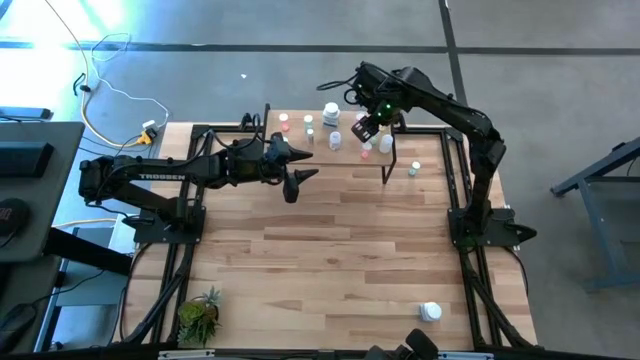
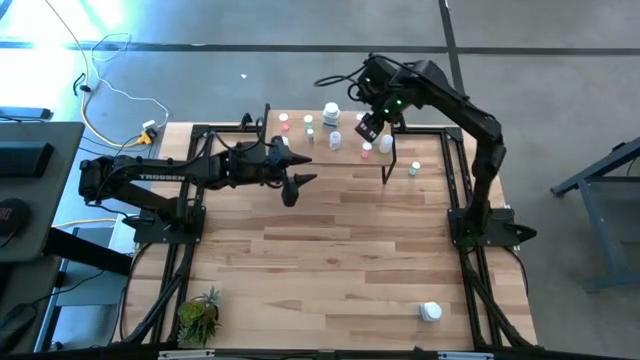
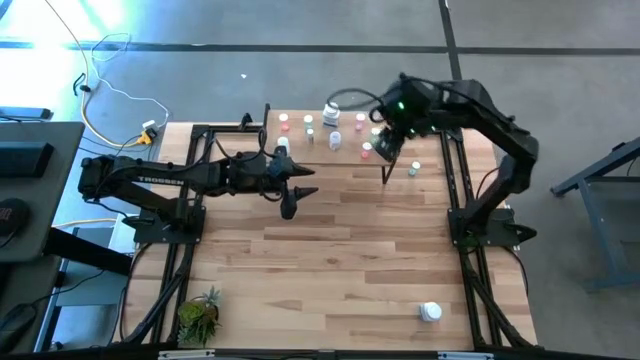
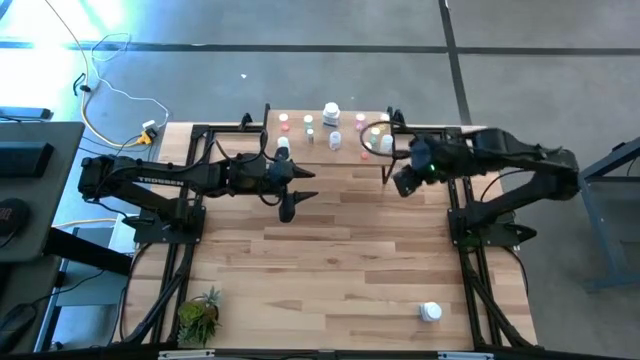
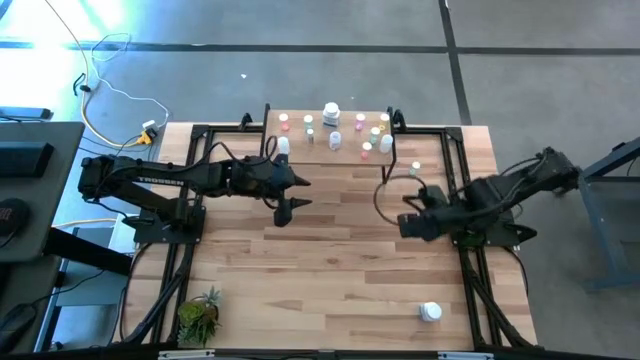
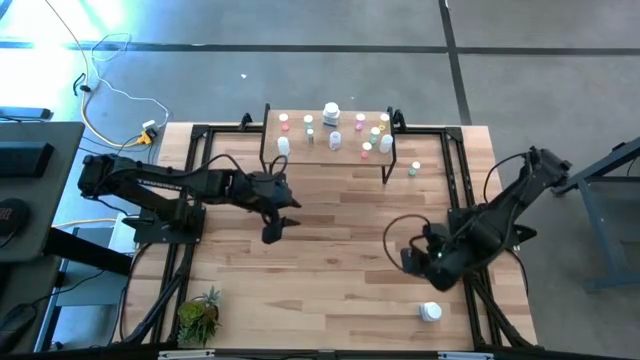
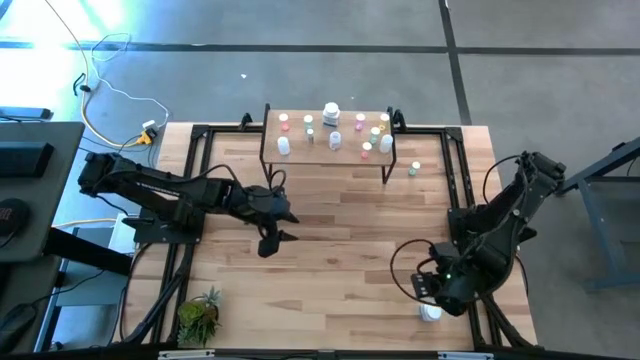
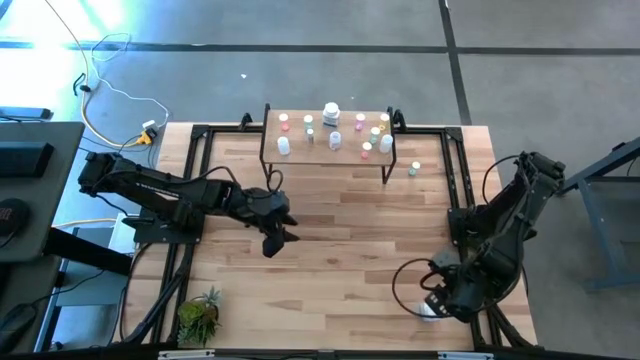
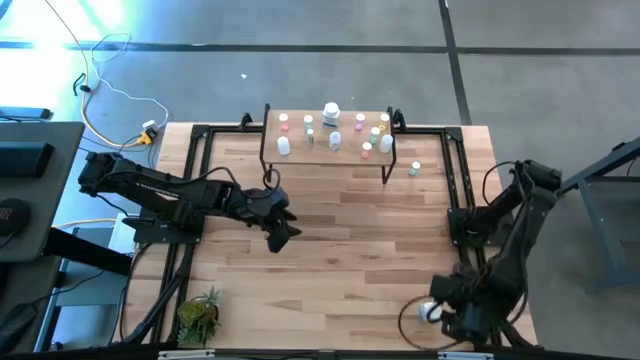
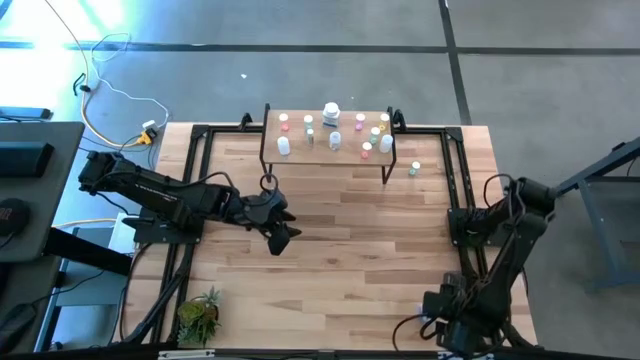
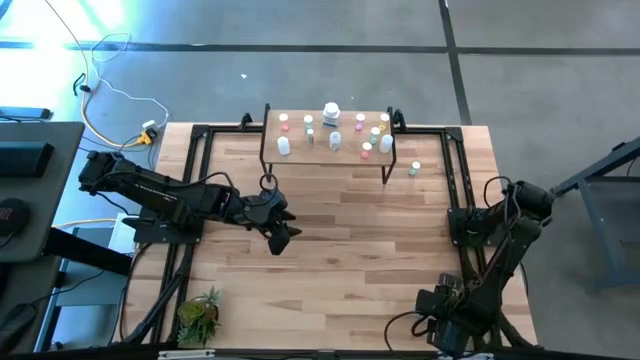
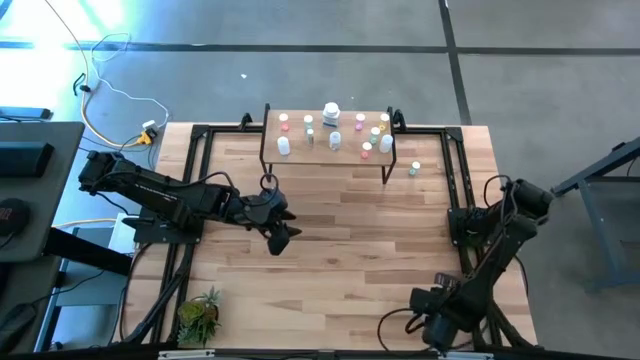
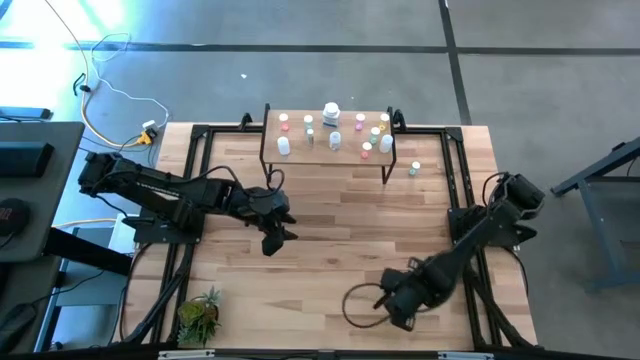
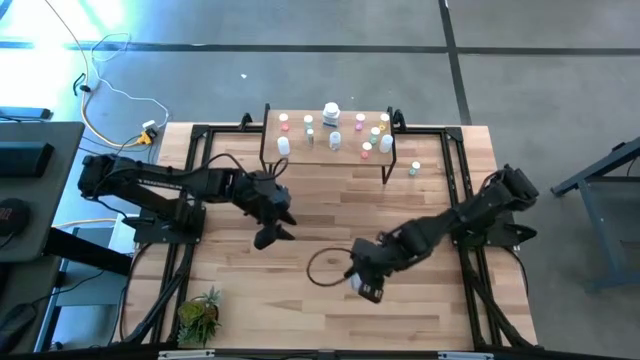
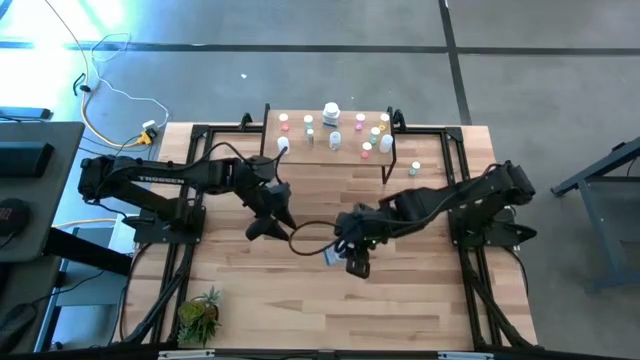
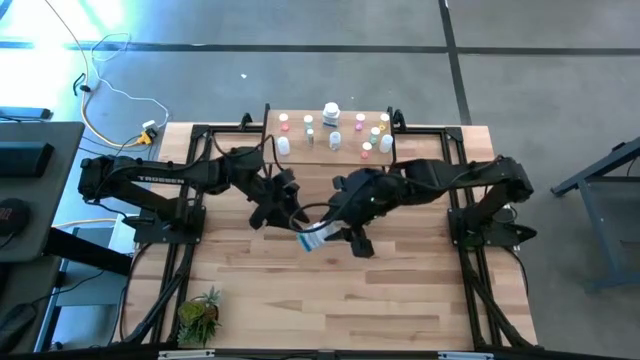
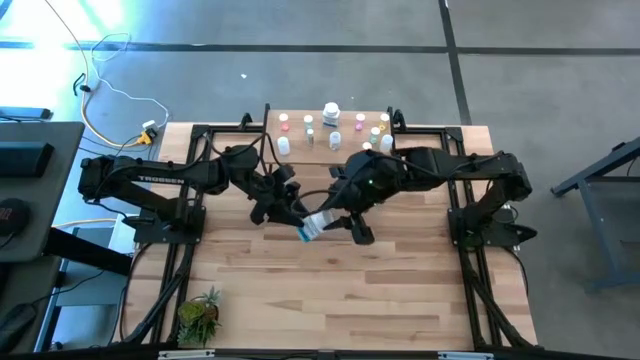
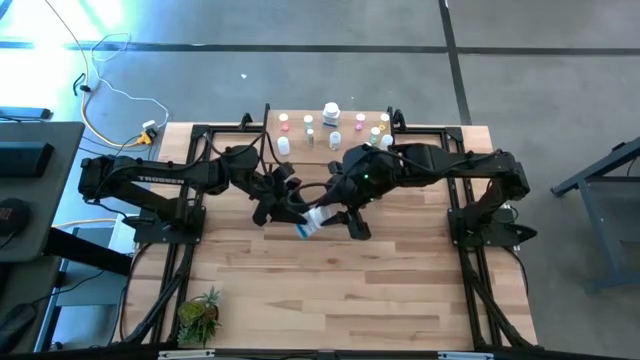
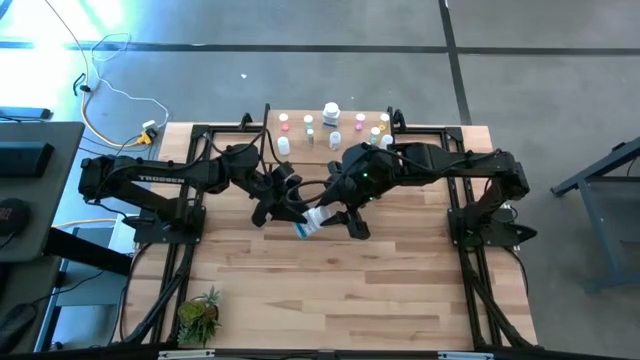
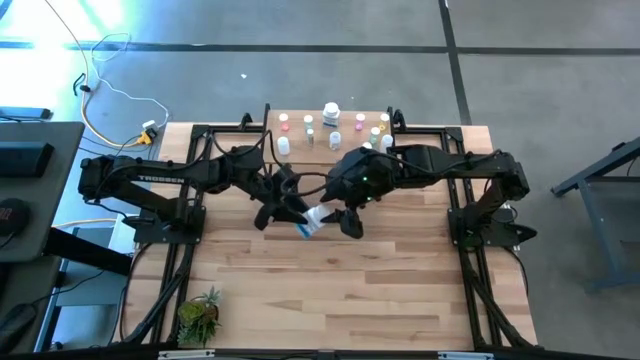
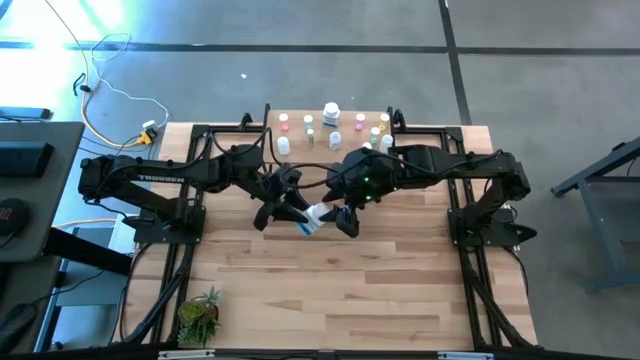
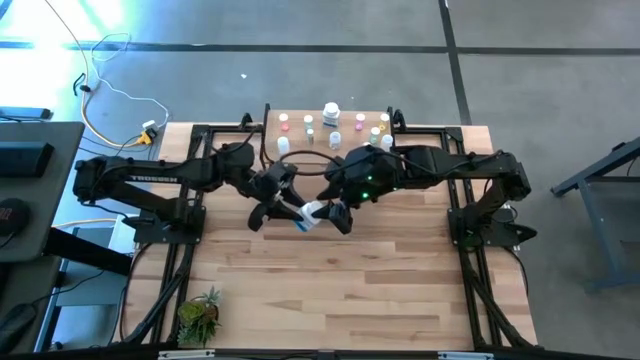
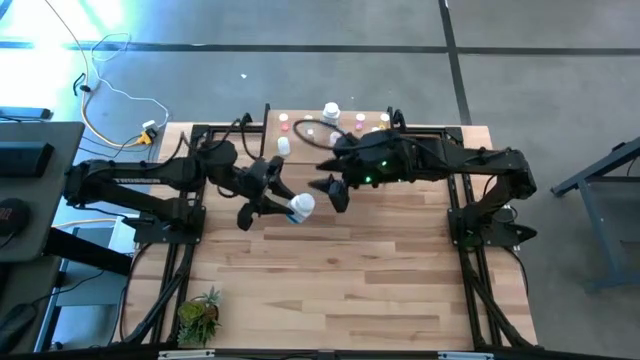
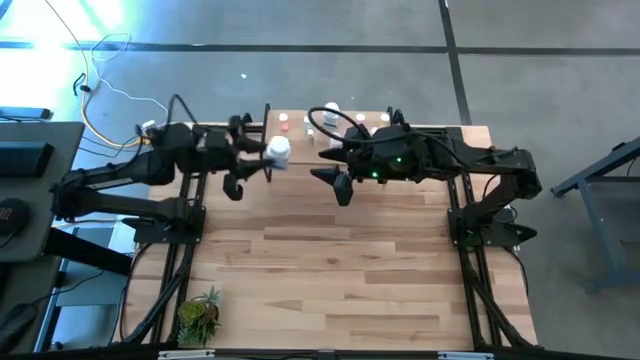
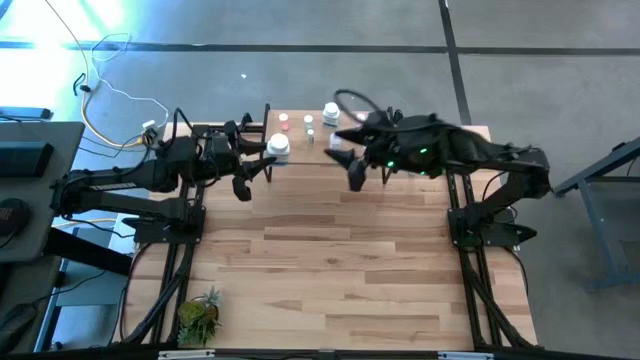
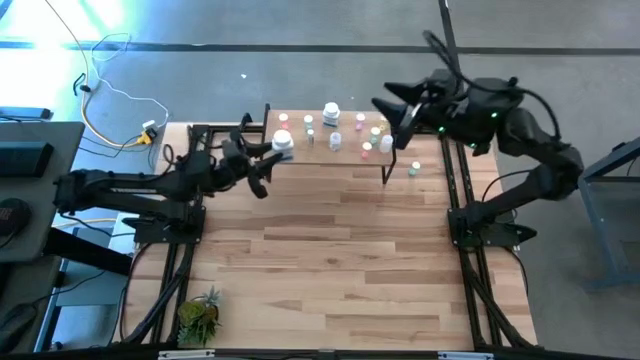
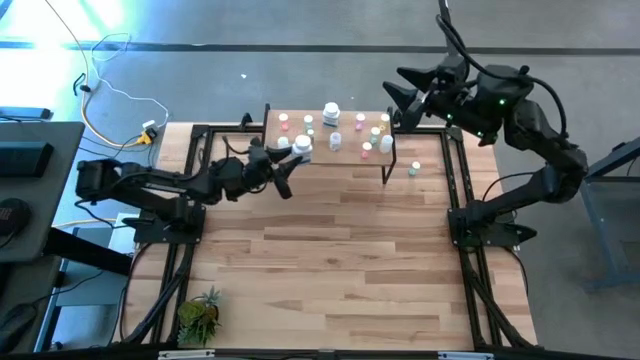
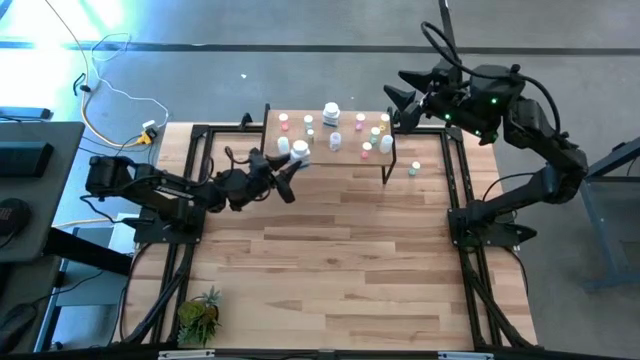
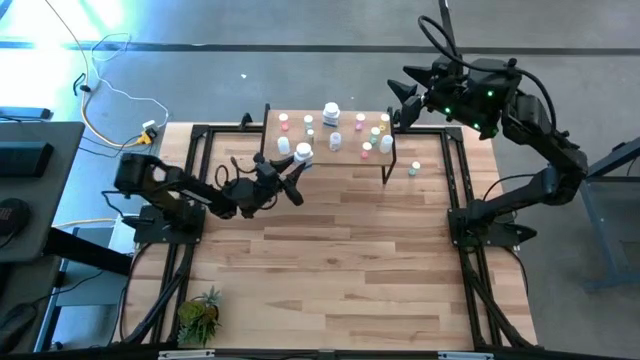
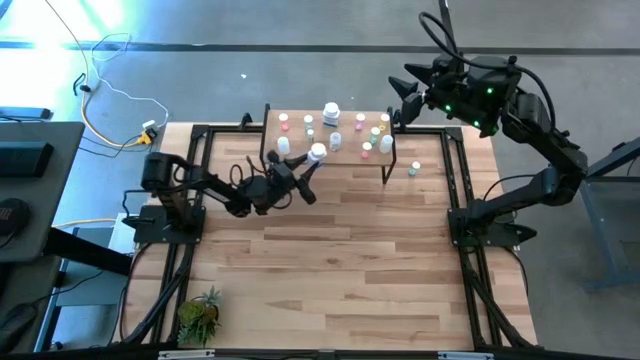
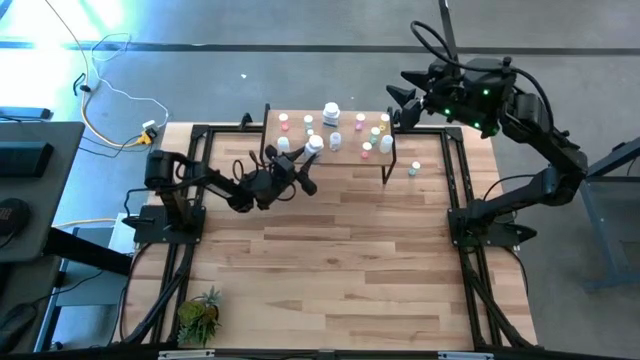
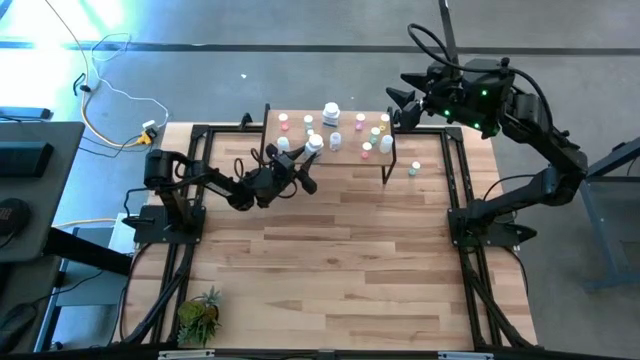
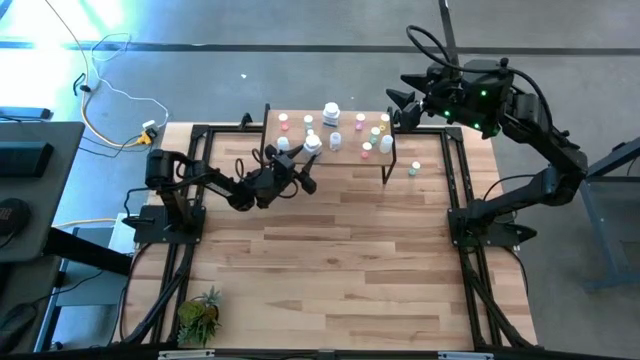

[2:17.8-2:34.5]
Task: Pick and place medicine bottles onto shelf by color
Put the white pill bottle on the shelf

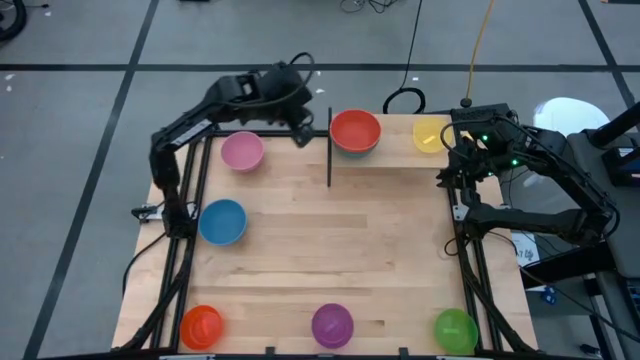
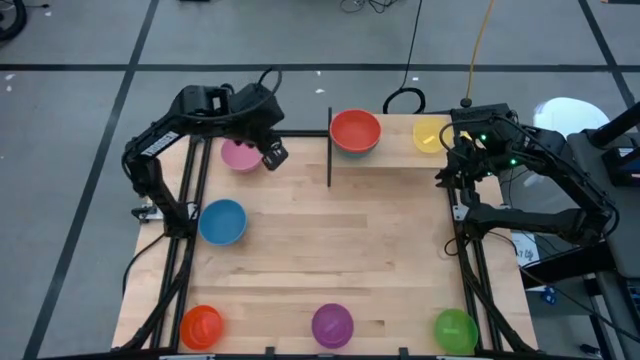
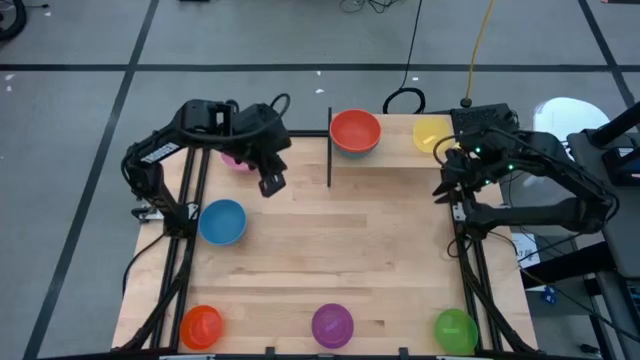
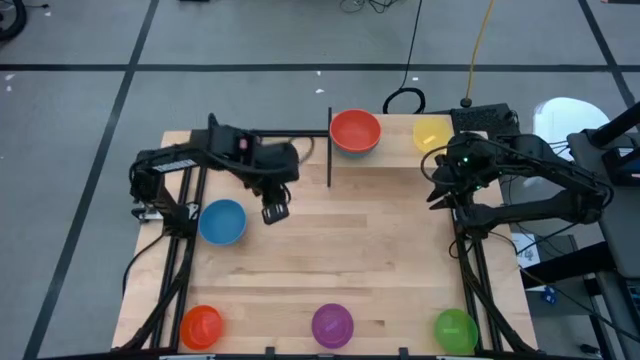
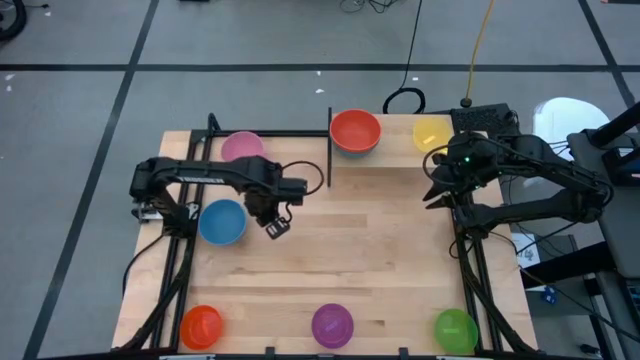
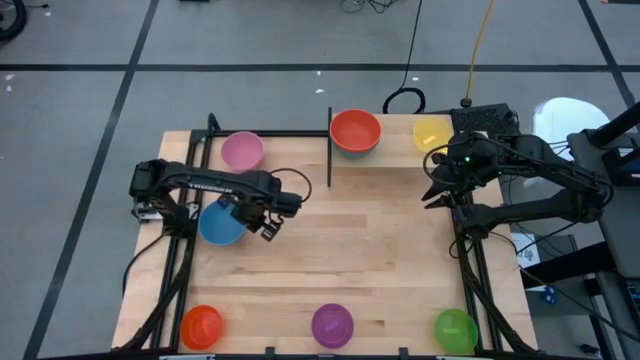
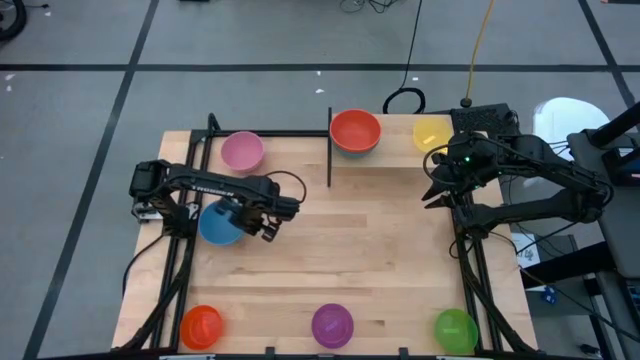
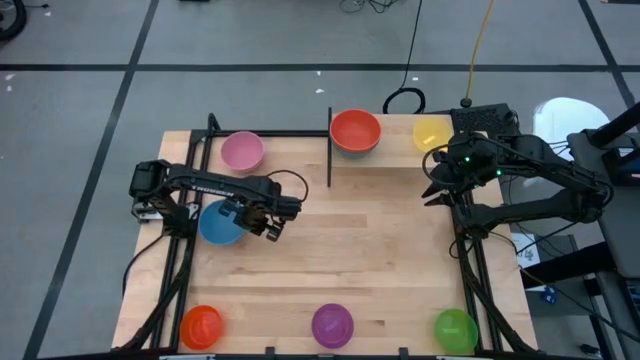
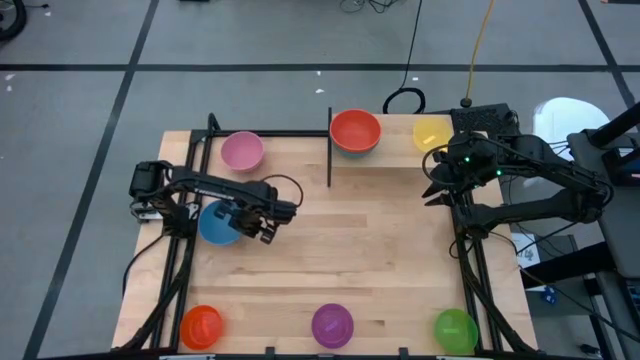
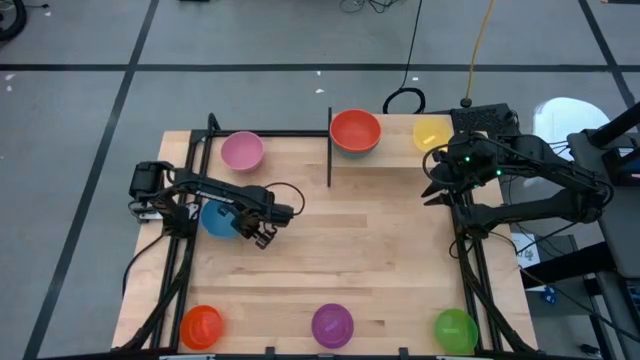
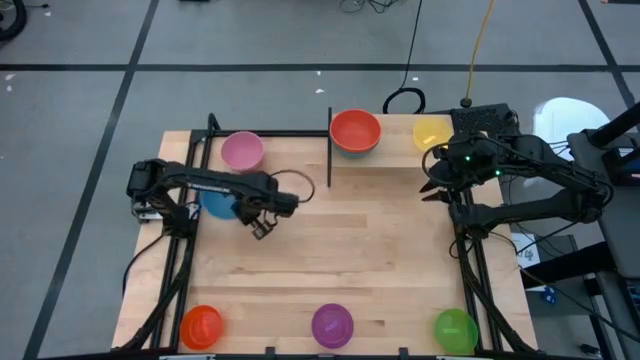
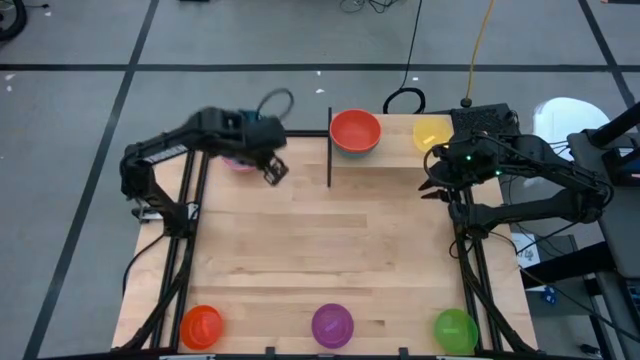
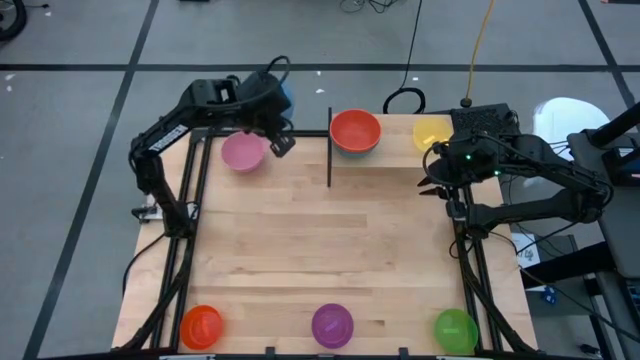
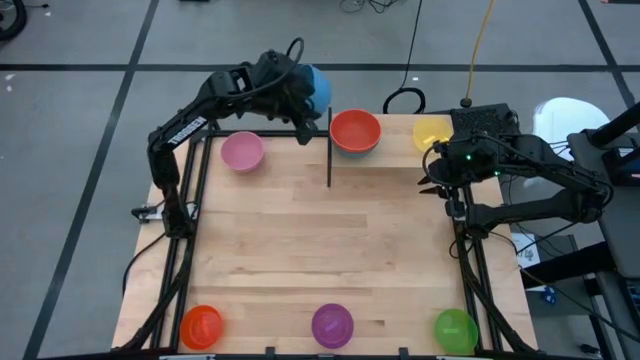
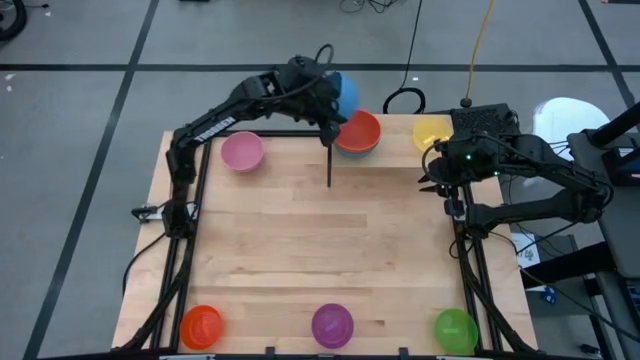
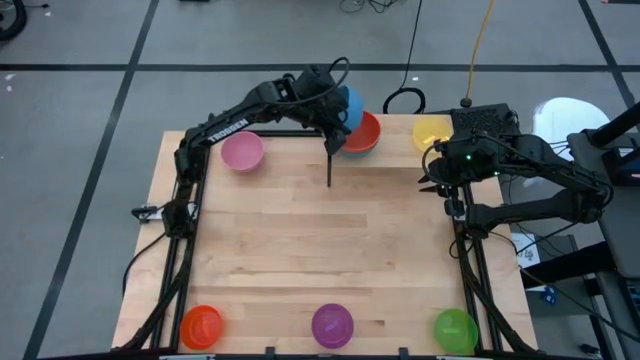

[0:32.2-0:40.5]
Task: Place and stack bowls onto a shelf
Stack the blue bowl on top of the orange bowl on the shelf
